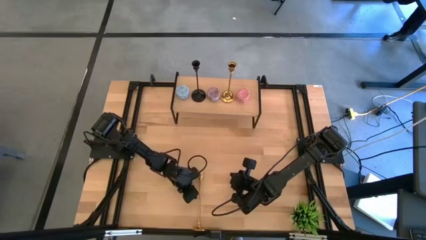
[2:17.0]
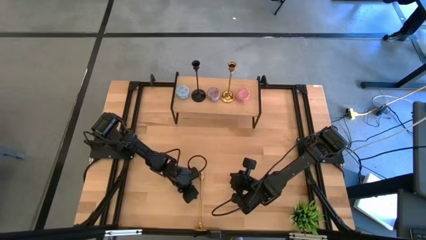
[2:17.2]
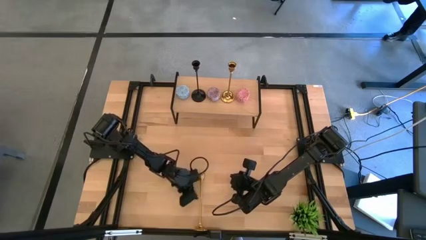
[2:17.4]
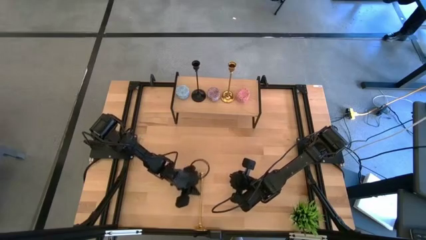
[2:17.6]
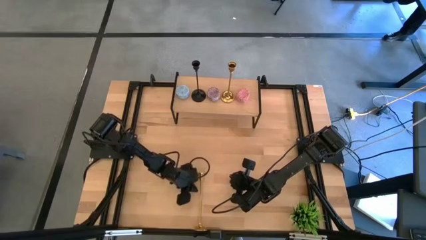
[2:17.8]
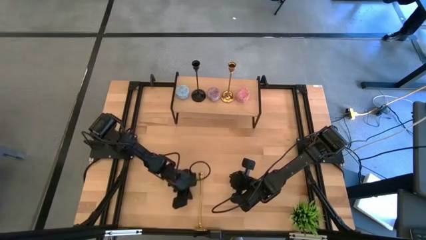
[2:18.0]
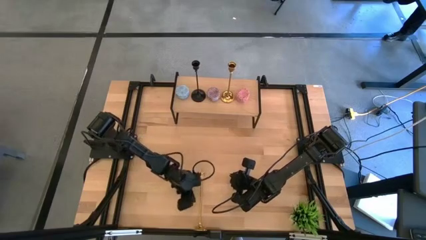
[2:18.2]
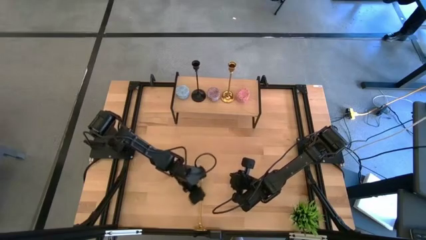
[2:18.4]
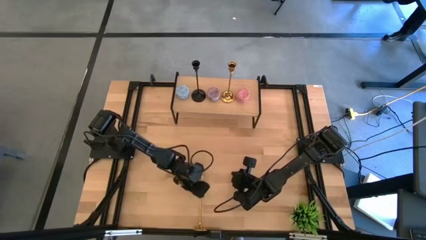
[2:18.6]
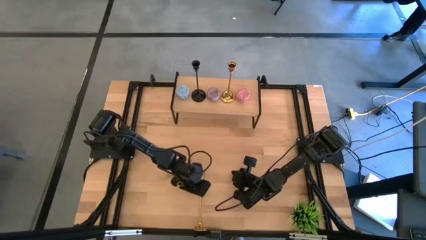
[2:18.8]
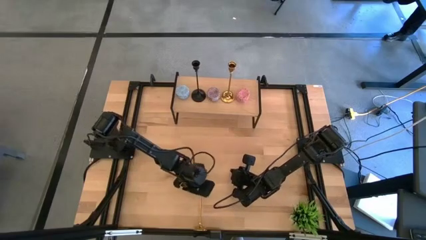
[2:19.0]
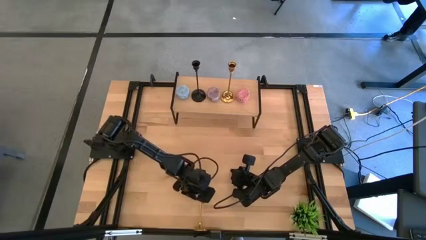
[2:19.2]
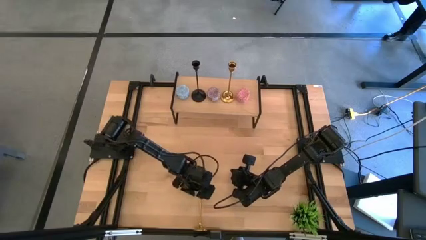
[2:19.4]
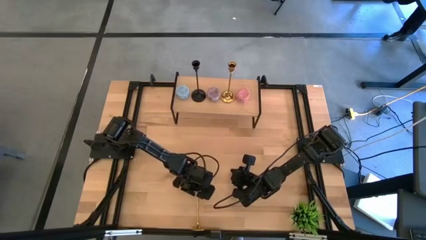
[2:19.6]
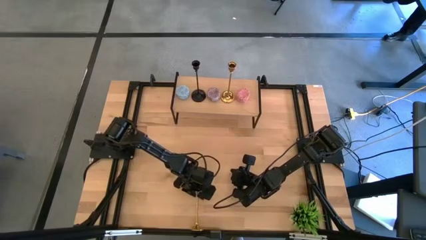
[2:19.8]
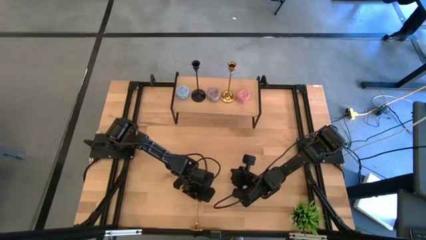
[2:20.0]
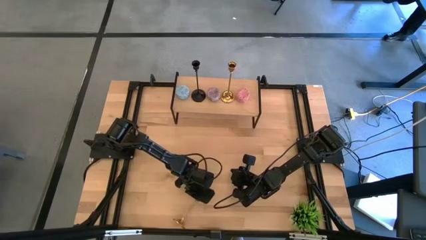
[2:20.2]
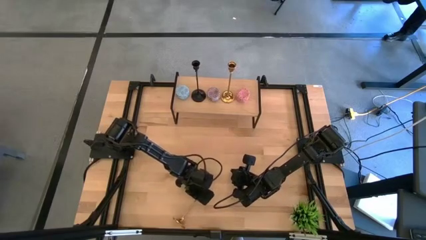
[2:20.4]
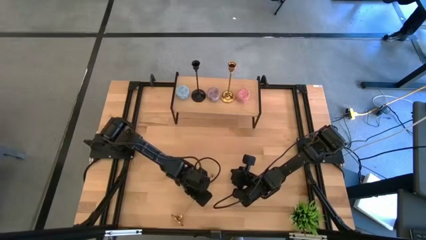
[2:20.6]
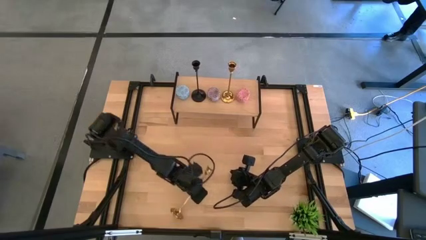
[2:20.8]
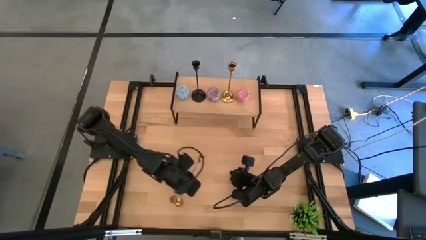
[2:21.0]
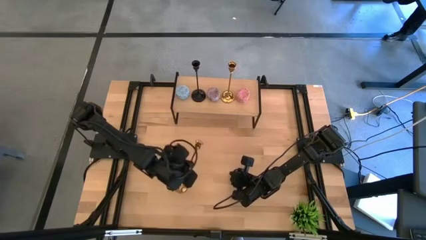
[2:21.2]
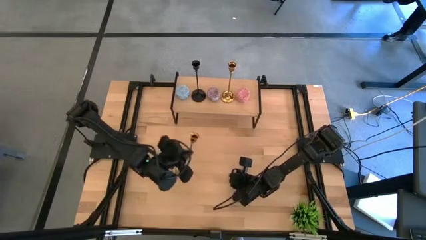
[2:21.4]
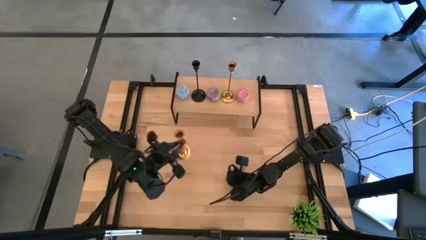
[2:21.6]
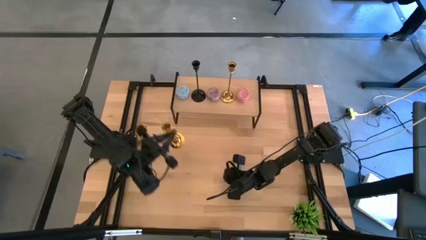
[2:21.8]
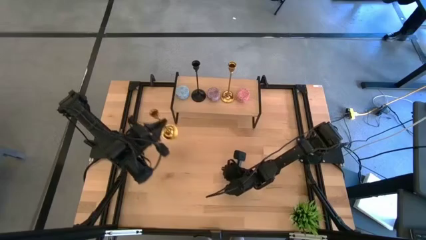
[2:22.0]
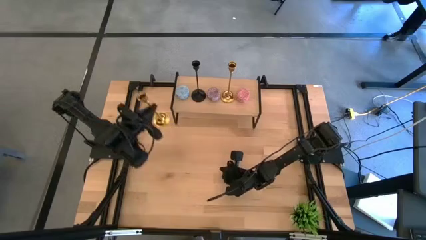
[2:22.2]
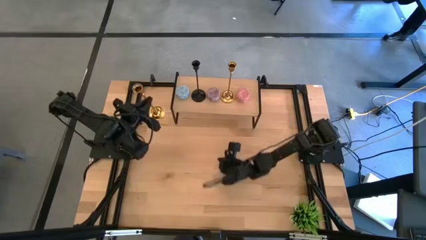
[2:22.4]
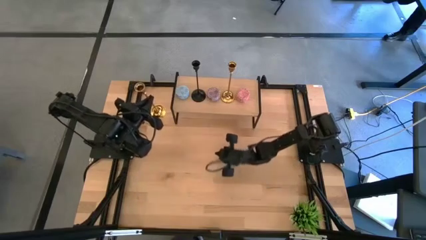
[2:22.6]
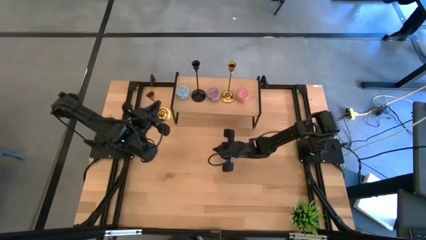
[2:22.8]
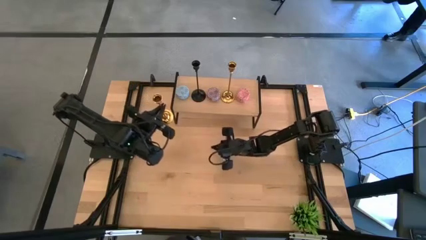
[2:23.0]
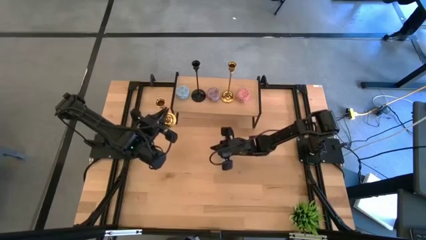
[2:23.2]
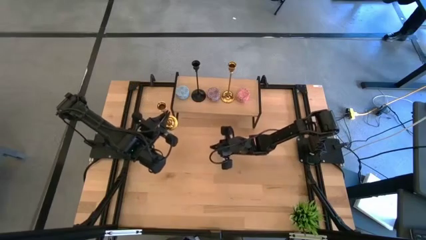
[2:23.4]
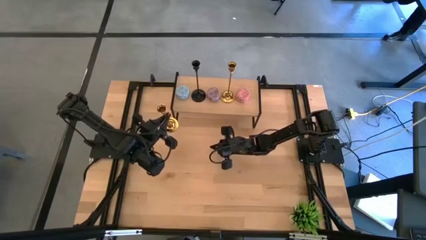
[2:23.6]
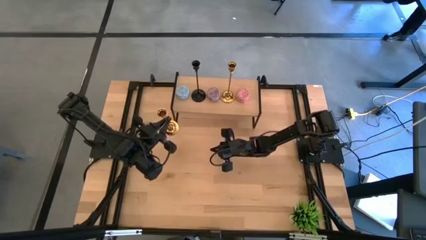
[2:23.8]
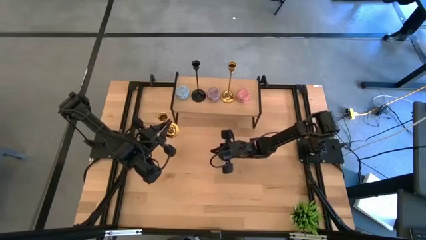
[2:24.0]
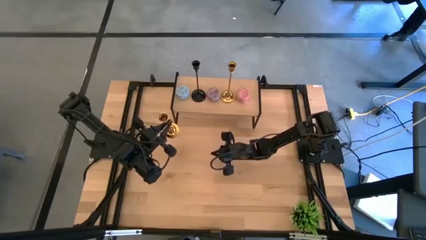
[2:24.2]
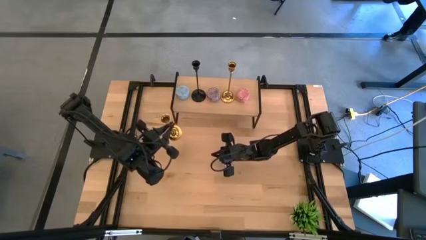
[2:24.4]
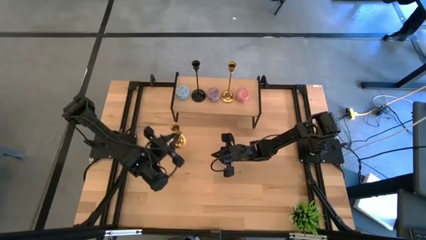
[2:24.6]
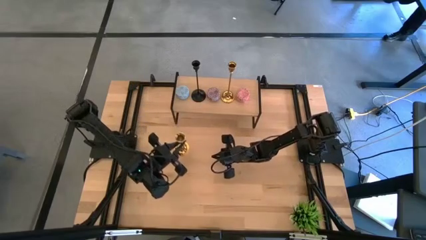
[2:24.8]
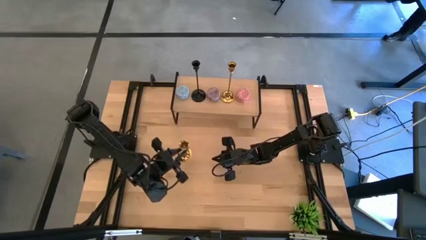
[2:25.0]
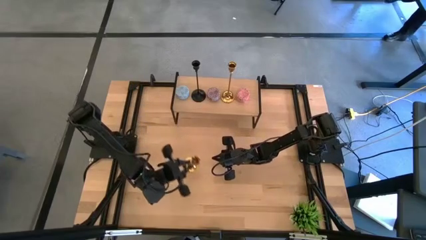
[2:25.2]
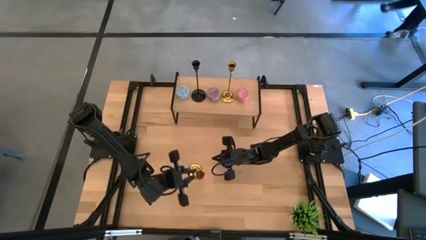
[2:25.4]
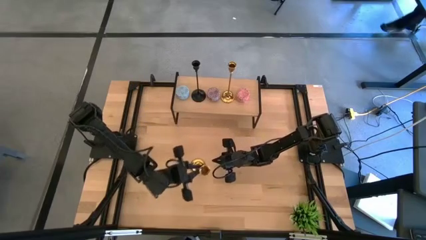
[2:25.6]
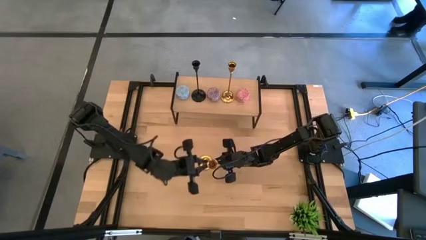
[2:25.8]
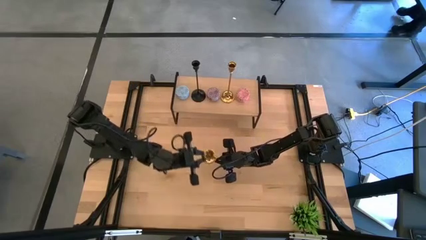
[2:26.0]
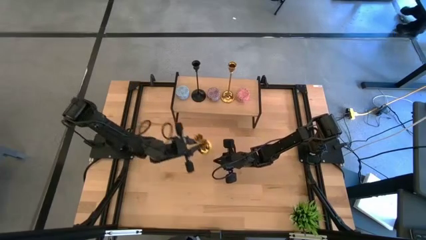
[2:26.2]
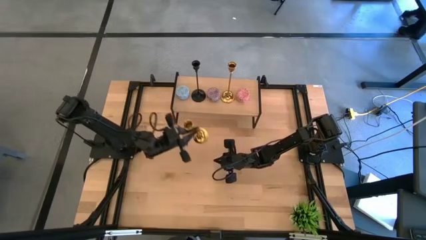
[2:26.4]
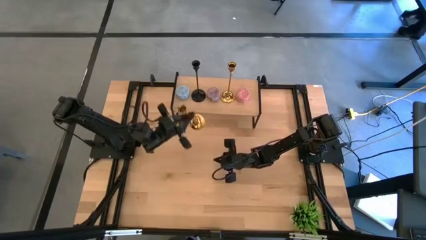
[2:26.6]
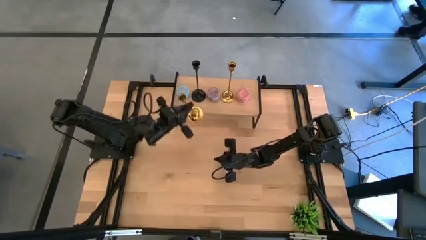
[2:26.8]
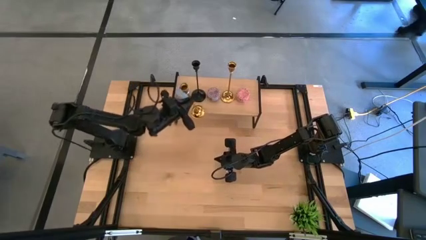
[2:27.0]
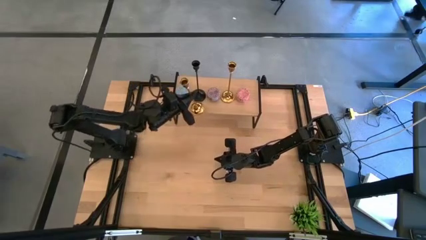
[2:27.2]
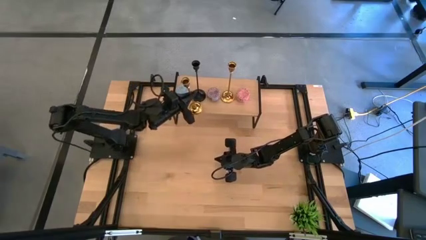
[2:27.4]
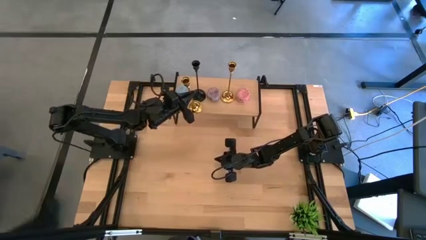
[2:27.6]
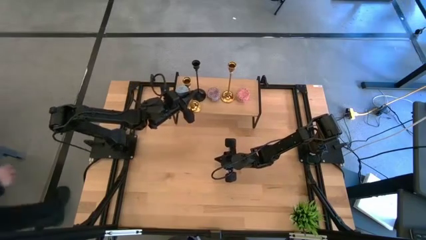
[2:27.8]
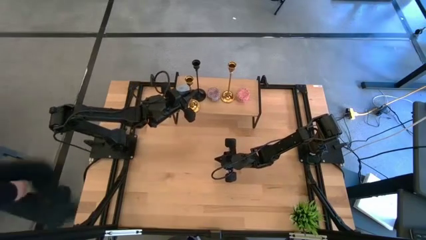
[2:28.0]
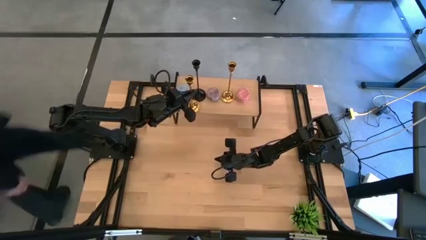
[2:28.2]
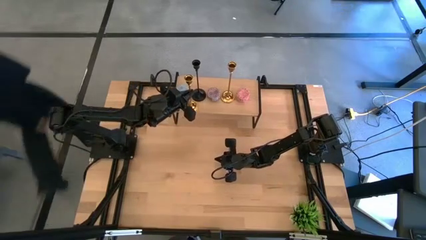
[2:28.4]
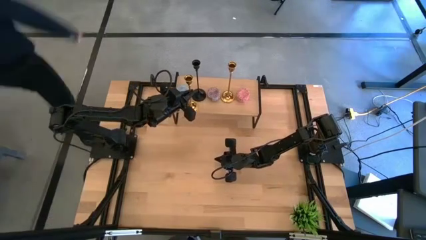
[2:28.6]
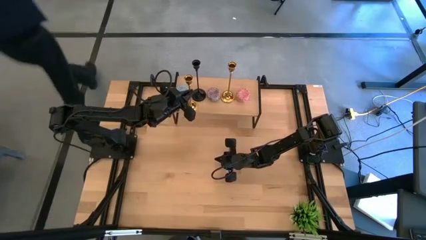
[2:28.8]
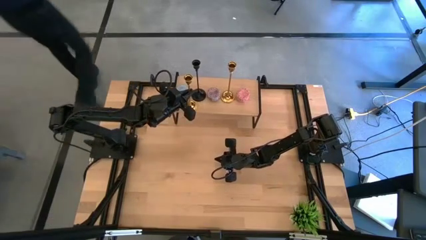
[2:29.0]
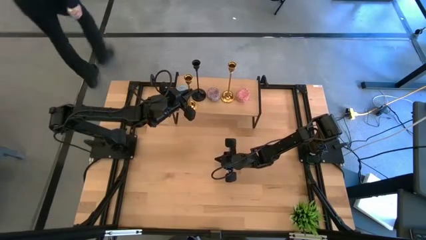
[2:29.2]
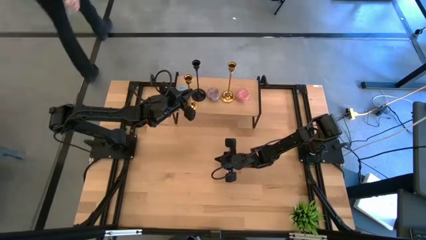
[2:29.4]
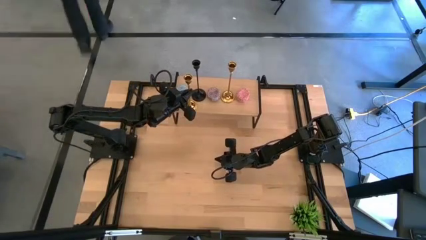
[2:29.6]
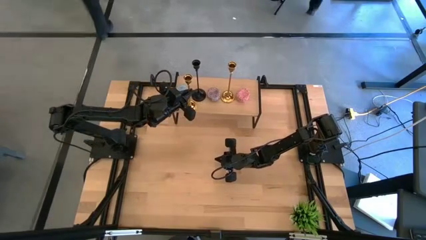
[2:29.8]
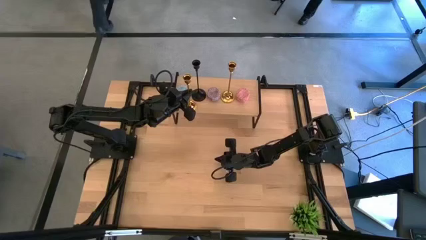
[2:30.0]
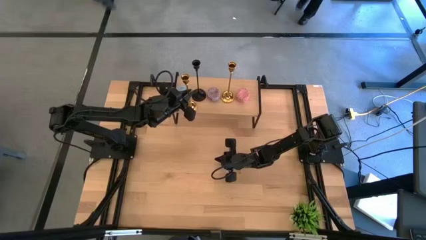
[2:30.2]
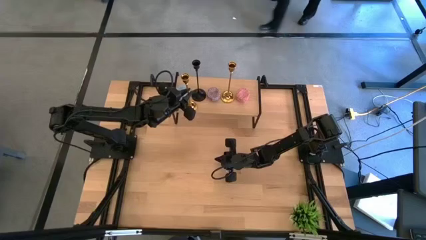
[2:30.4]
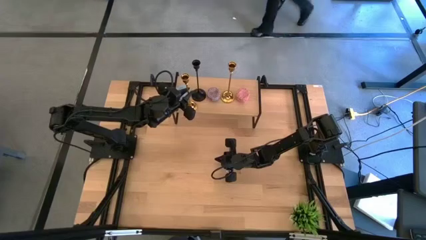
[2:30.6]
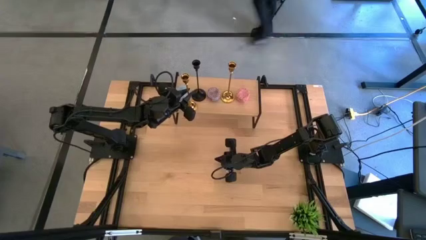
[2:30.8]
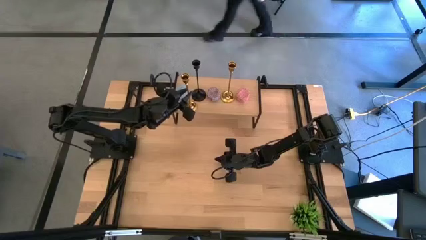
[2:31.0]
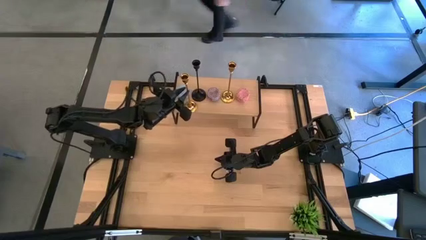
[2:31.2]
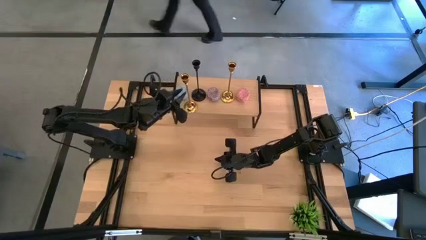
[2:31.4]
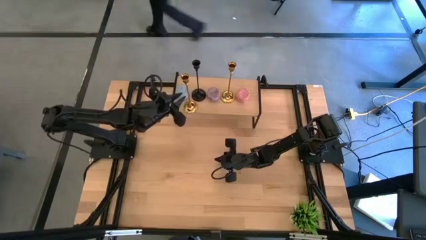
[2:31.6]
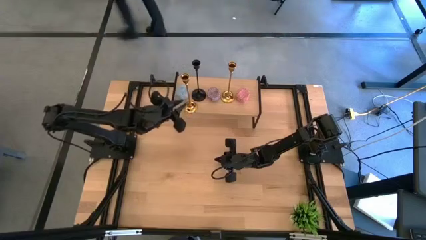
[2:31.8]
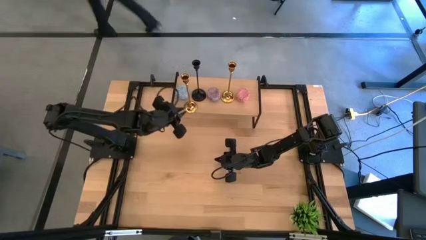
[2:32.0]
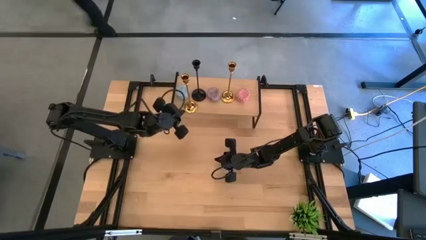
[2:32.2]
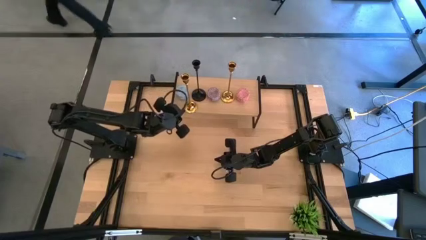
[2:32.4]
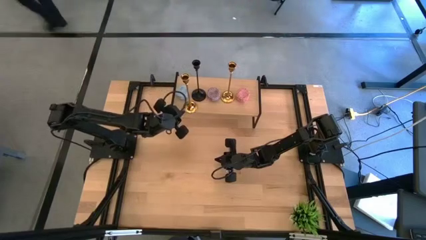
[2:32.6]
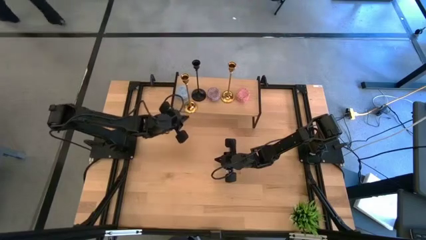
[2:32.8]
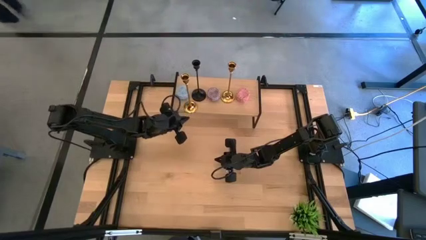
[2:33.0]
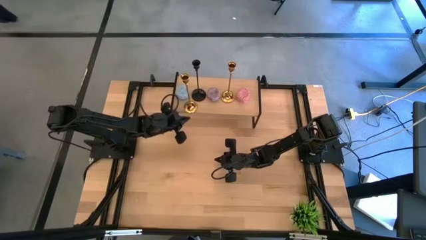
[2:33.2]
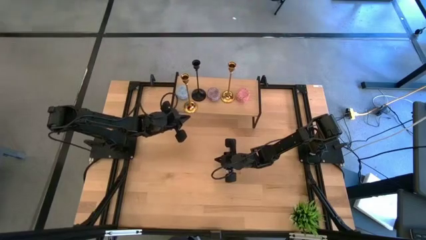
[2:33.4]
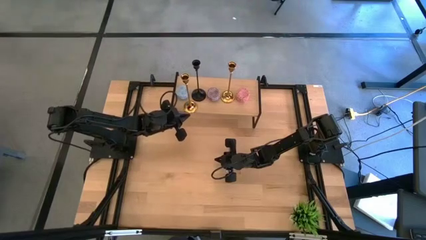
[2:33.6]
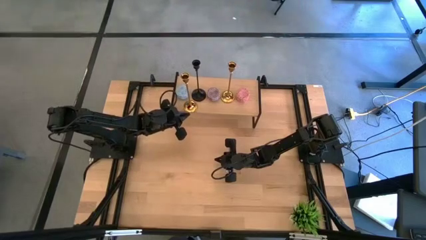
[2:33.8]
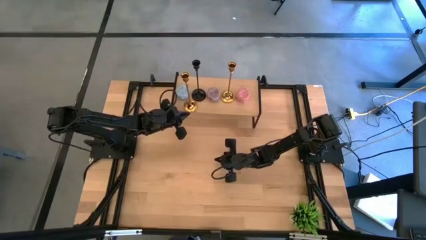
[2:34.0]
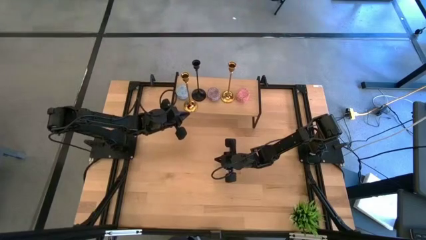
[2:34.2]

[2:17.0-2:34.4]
Task: Pick & Place candle stick holders
Put the gold candle holder on the shelf
